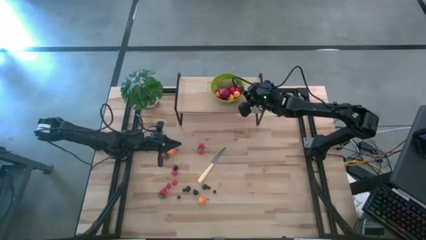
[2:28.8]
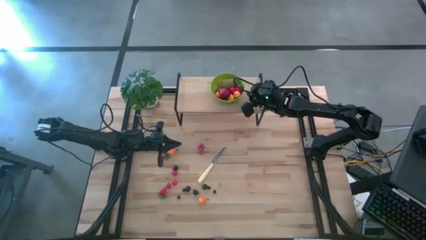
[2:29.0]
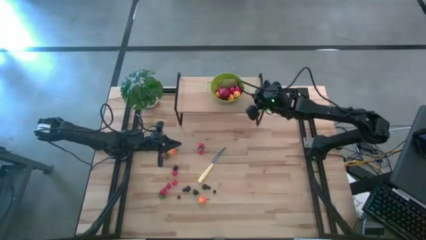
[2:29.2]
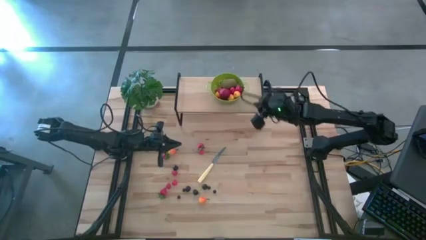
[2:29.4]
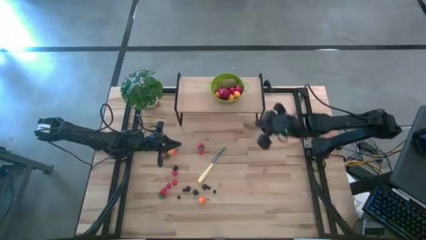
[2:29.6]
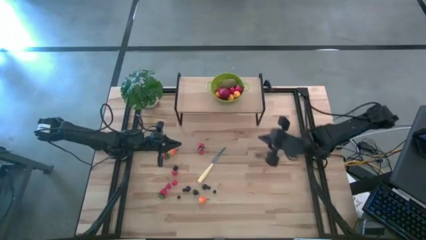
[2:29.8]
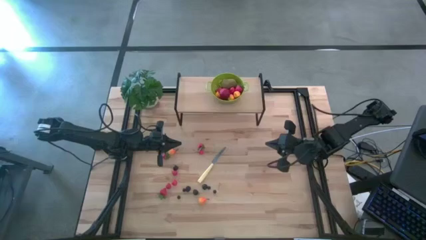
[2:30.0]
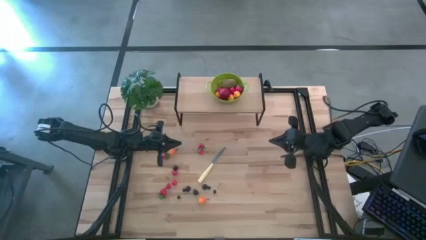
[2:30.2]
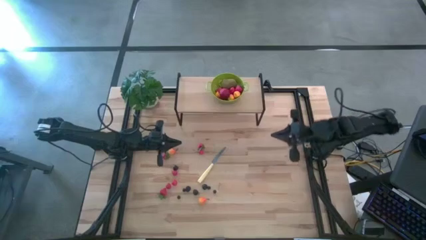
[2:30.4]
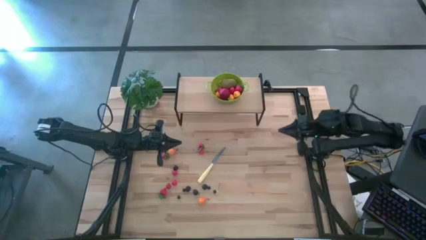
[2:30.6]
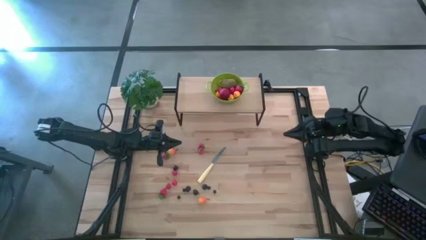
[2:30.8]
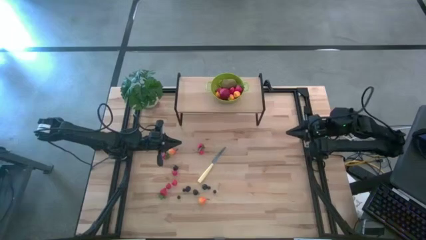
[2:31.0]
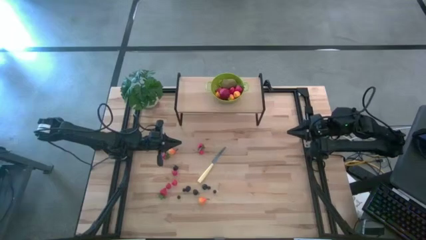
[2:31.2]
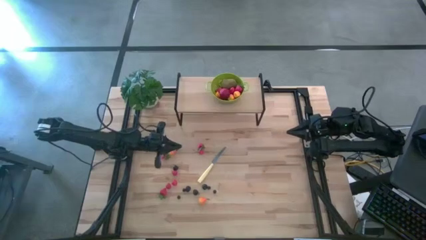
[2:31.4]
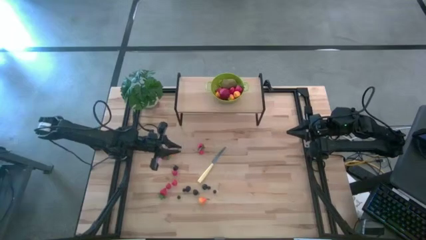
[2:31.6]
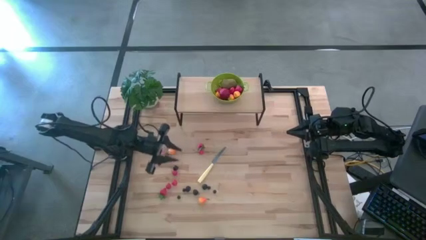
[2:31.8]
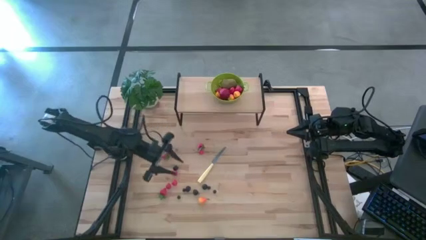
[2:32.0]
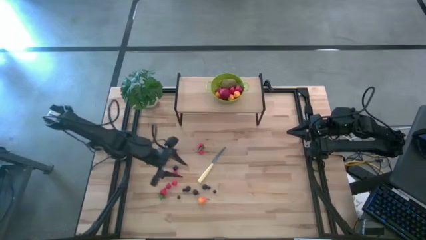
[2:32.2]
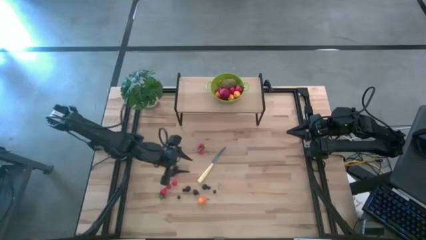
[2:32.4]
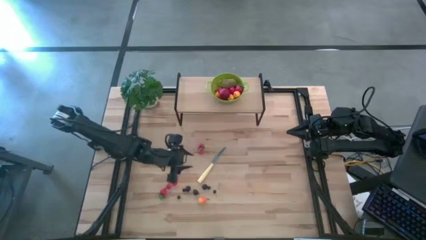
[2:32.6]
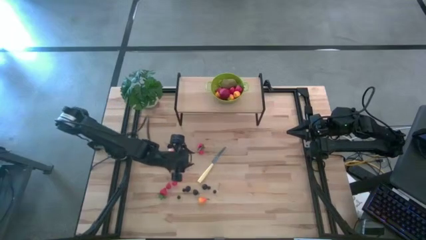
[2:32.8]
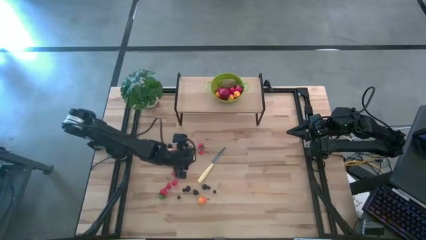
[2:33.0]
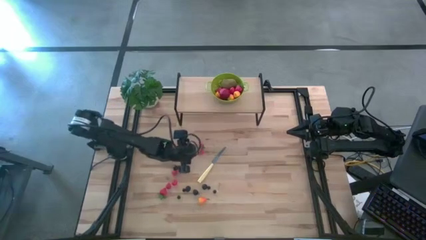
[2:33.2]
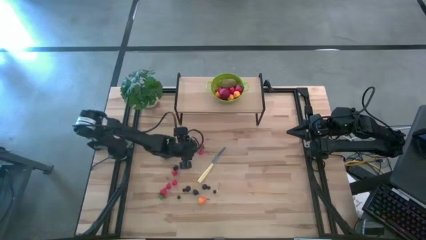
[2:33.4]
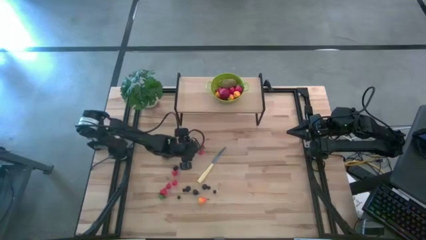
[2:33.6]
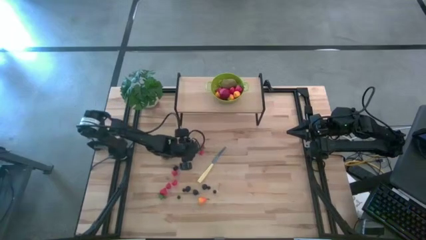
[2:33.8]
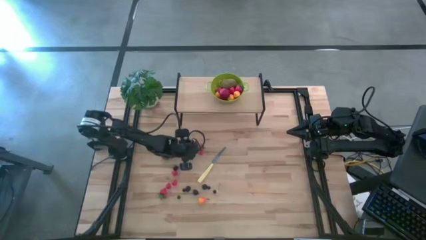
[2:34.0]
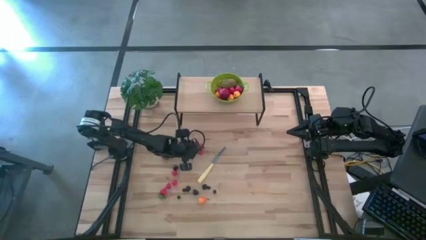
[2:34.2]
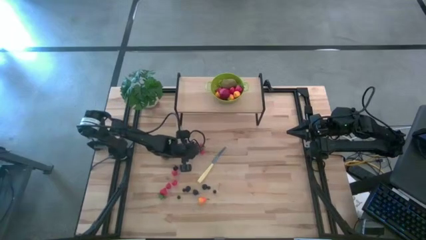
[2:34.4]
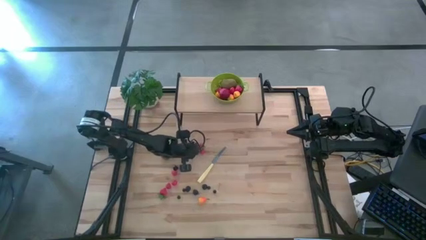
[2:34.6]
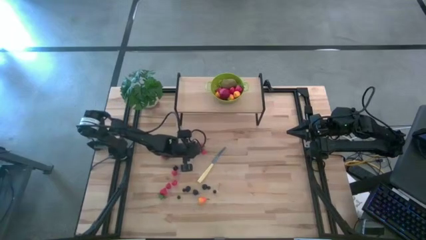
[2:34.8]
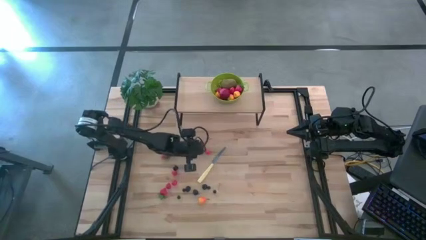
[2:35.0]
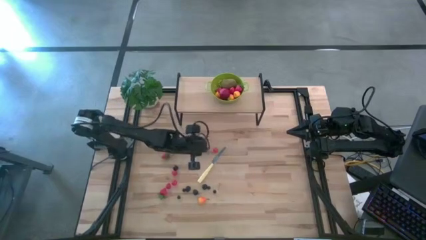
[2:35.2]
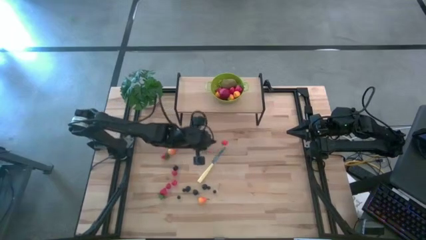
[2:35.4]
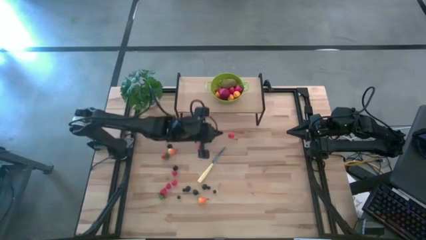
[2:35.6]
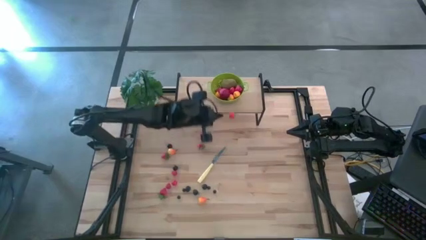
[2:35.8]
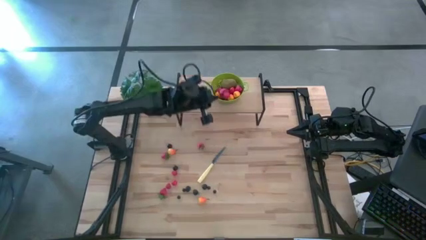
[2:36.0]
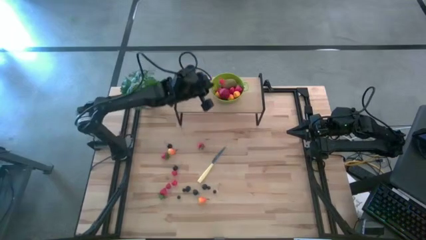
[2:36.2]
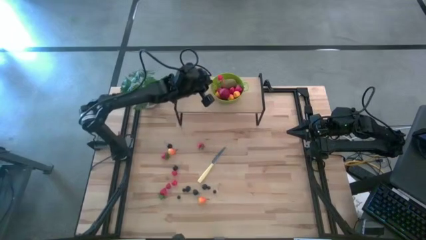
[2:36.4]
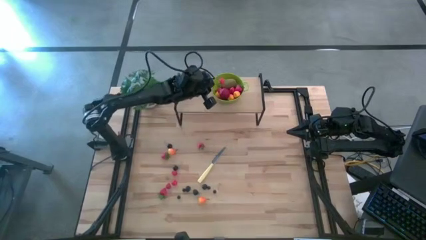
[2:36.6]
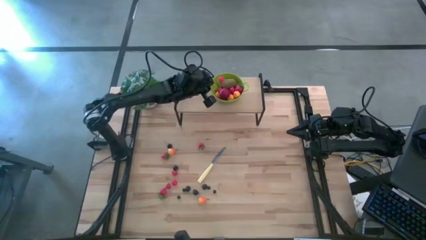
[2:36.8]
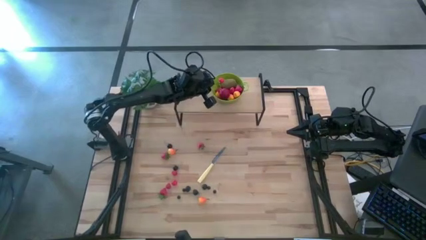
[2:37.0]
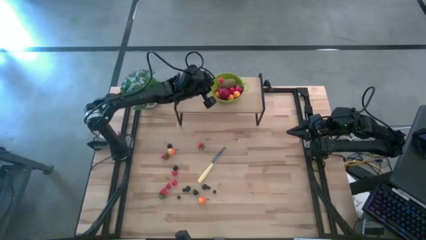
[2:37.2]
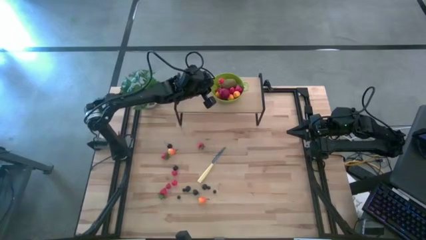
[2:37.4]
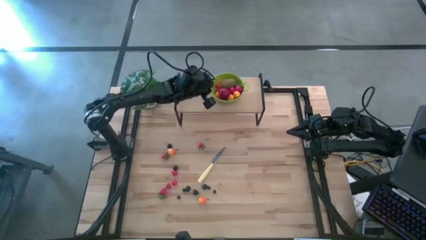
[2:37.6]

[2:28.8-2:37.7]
Task: Pick & Place Fruit
Put the red cherry into the strainer bowl

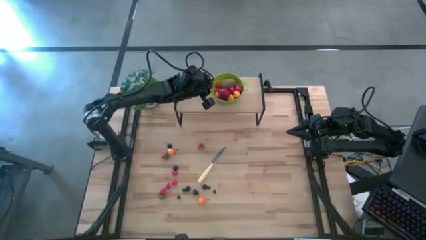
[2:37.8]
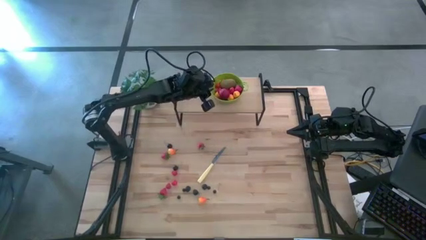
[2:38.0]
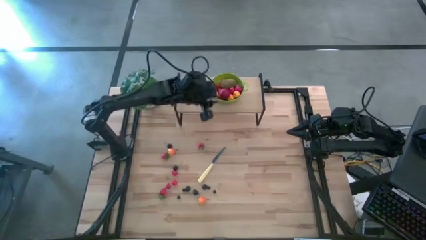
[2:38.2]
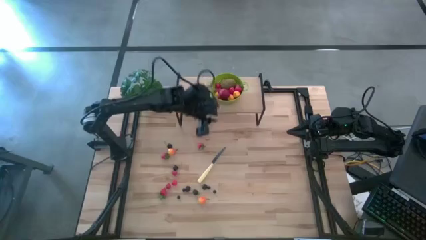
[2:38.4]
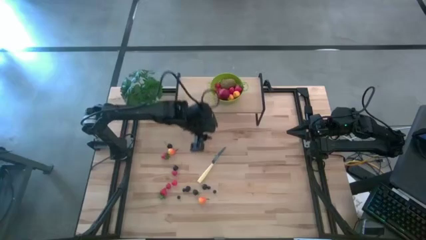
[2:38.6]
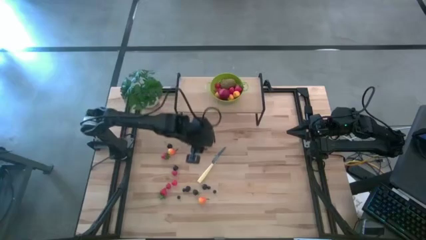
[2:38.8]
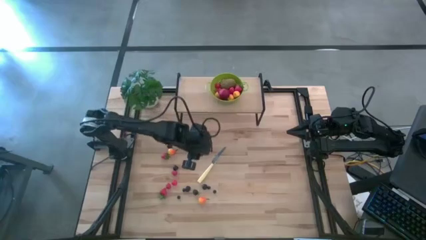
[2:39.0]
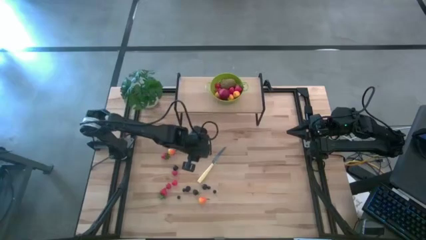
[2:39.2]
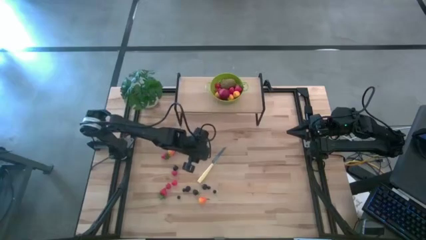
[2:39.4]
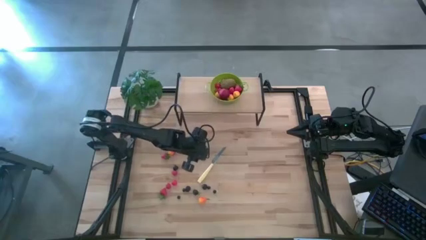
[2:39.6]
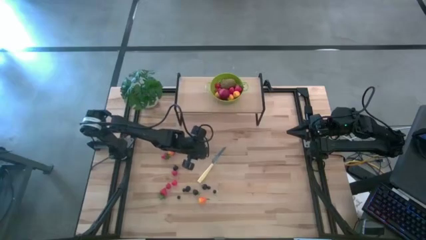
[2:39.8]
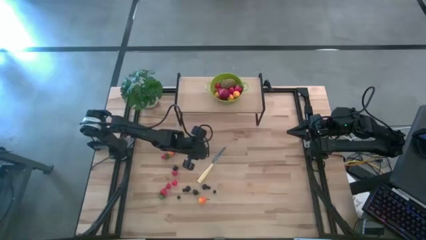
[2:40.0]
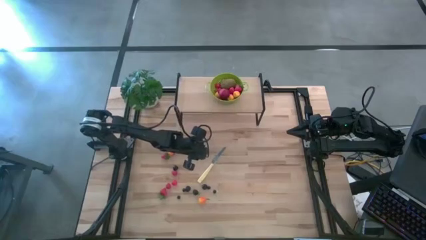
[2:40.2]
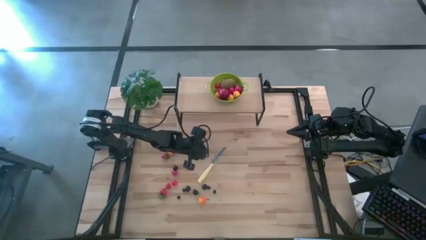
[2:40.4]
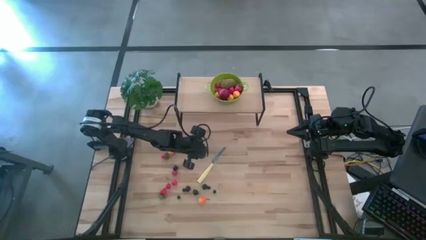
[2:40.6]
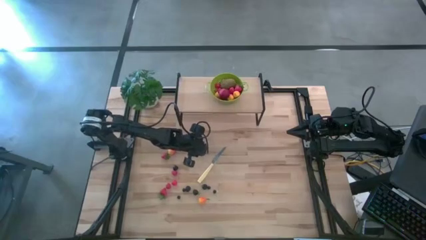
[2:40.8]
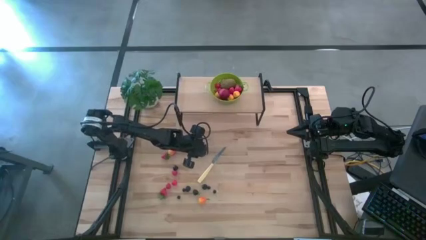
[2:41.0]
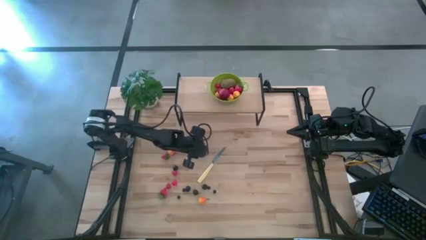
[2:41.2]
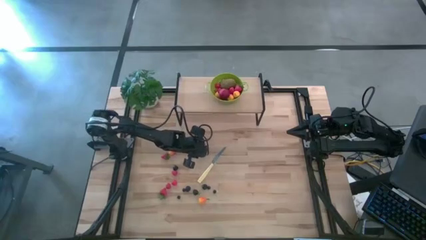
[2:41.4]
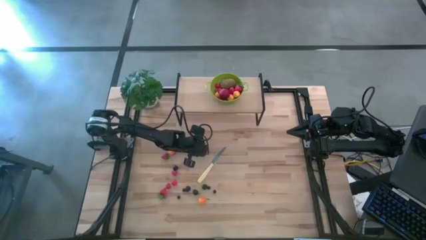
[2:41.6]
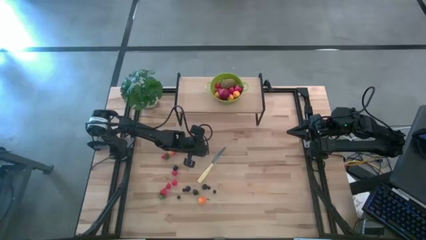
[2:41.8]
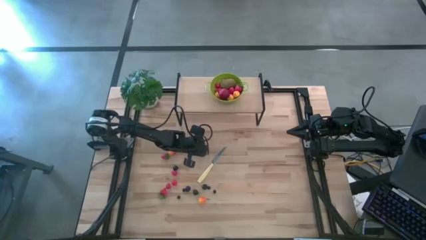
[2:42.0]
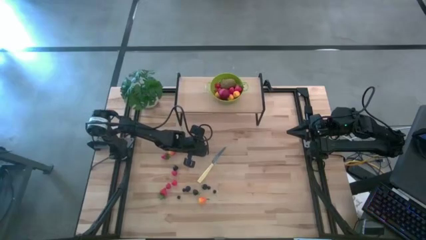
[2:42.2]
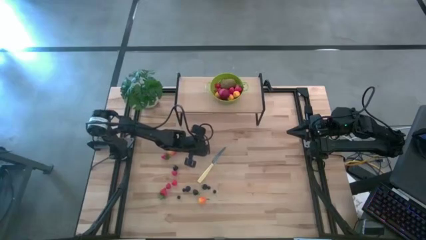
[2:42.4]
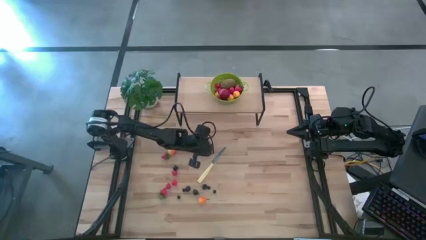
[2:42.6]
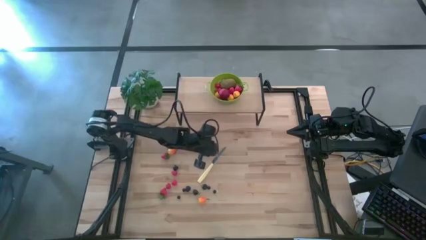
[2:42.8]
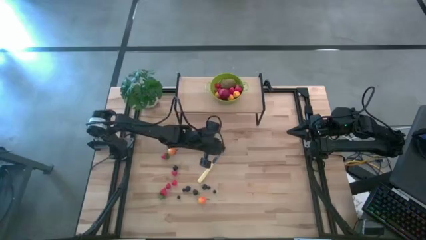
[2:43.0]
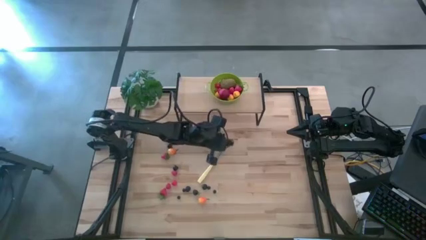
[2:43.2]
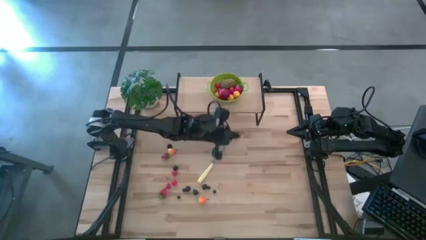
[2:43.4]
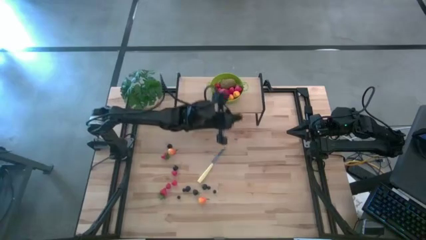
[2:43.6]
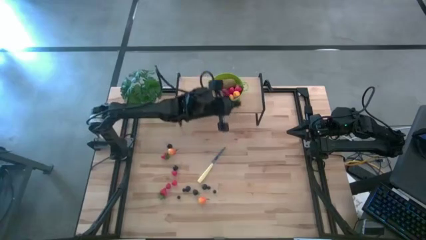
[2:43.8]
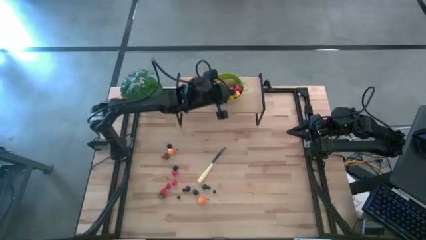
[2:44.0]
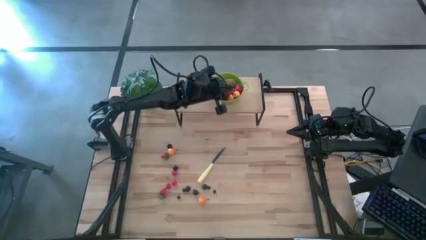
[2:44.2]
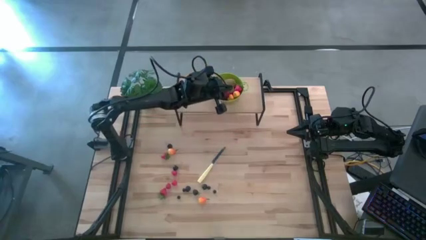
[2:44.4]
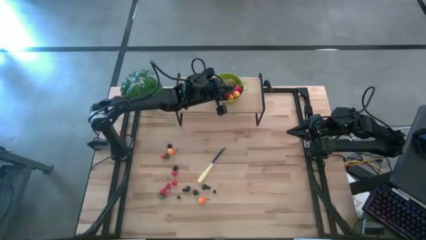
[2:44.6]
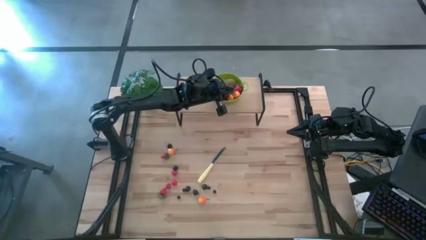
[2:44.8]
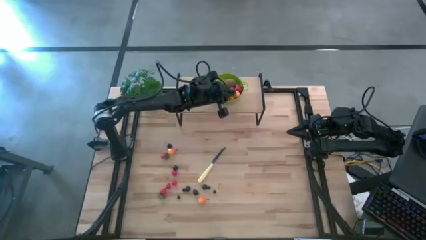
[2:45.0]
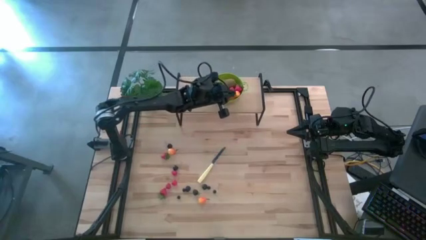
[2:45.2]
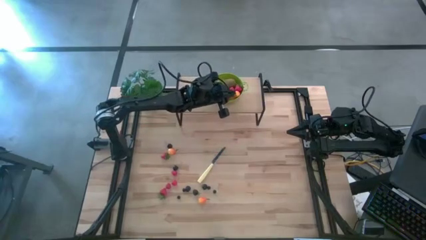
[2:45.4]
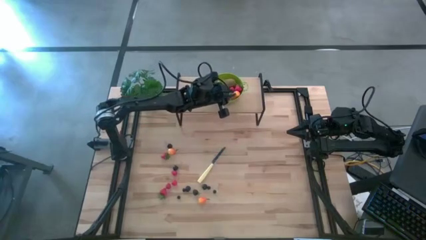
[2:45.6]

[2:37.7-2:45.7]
Put the strawberry into the strainer bowl
